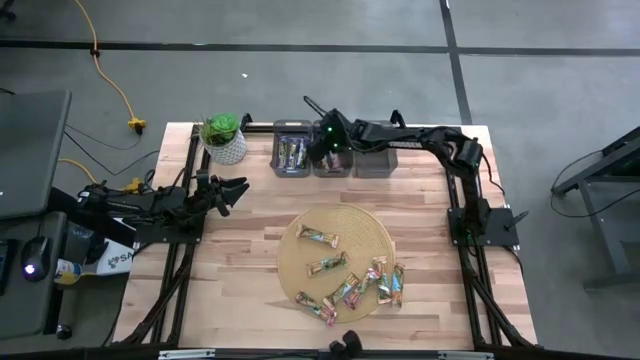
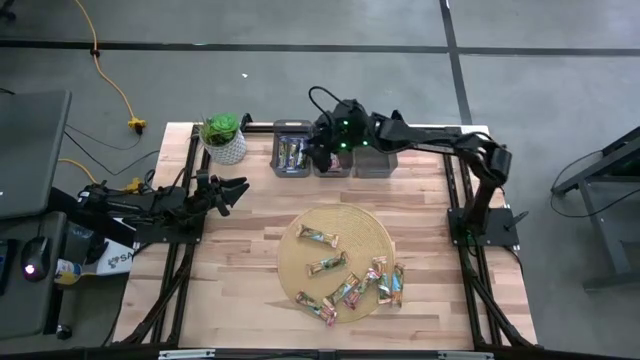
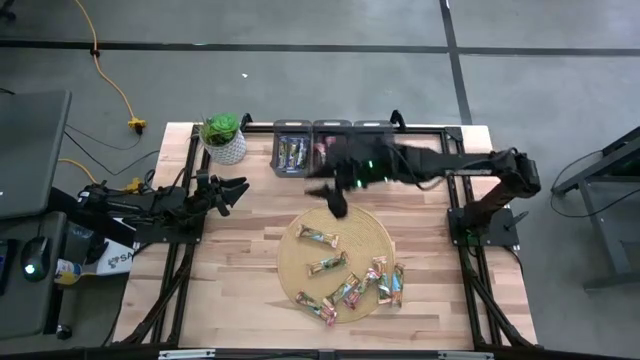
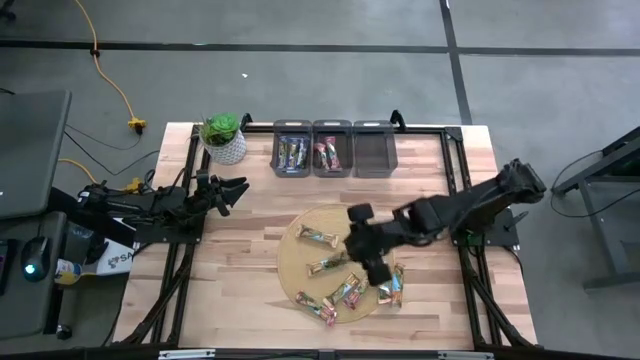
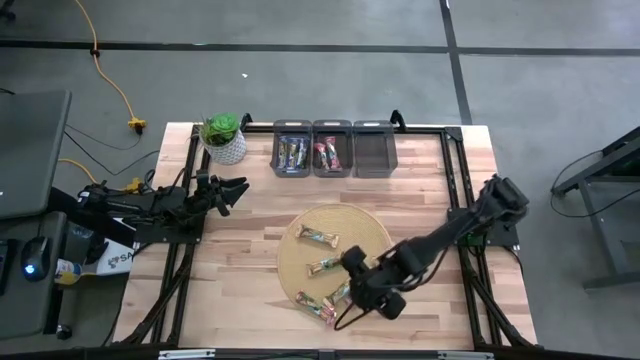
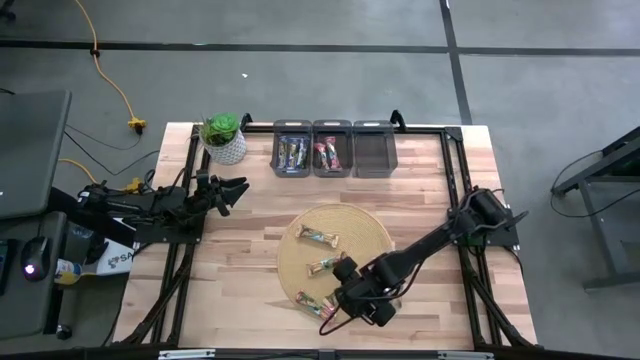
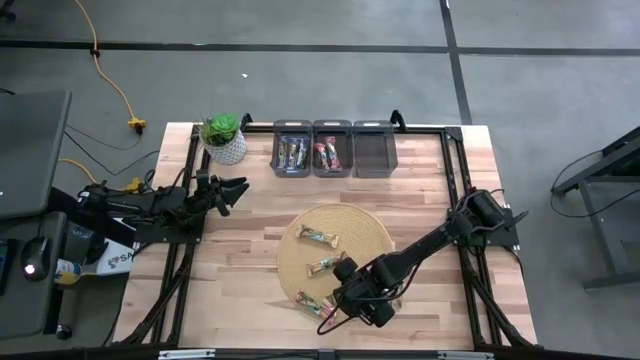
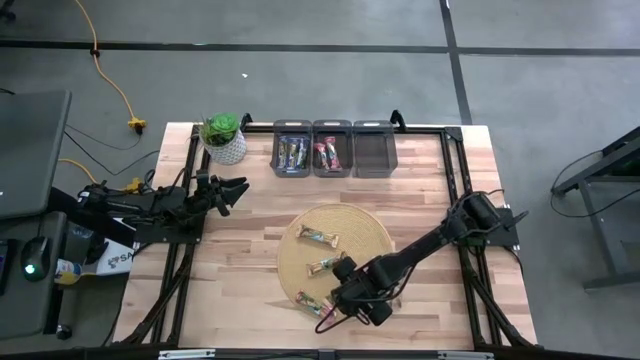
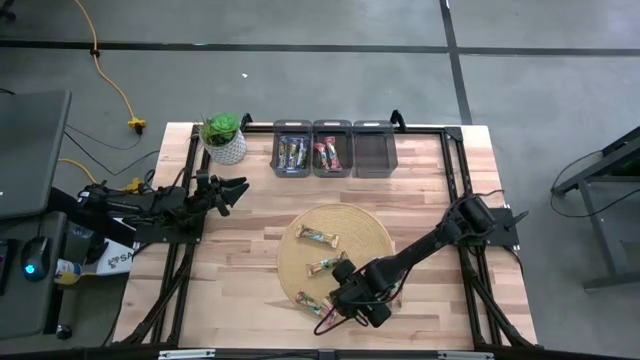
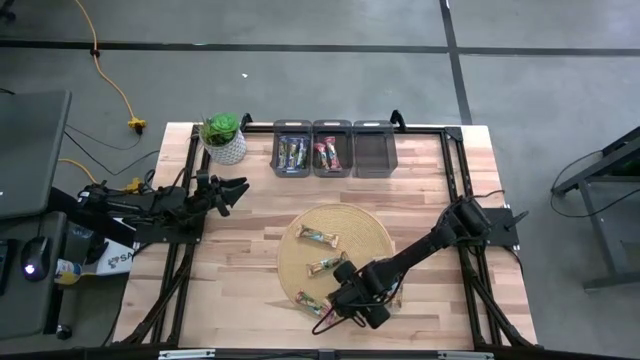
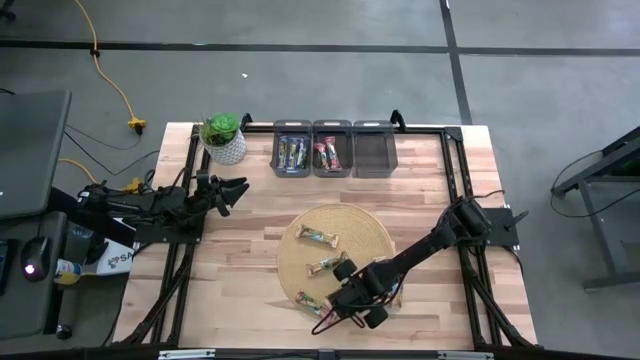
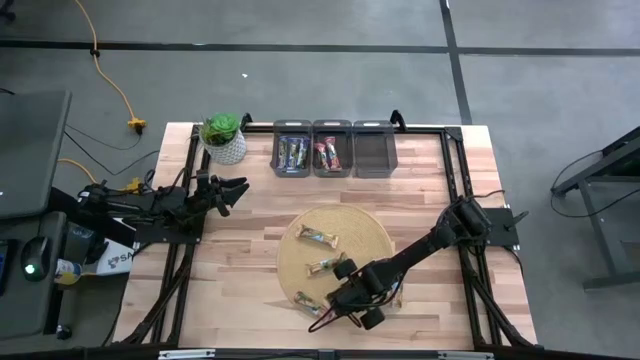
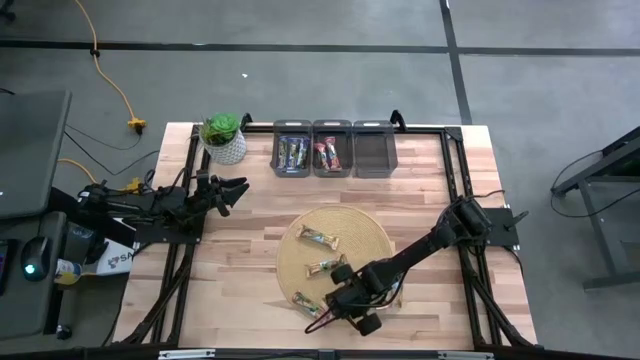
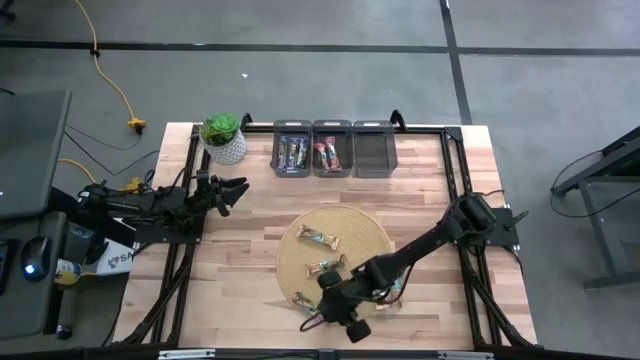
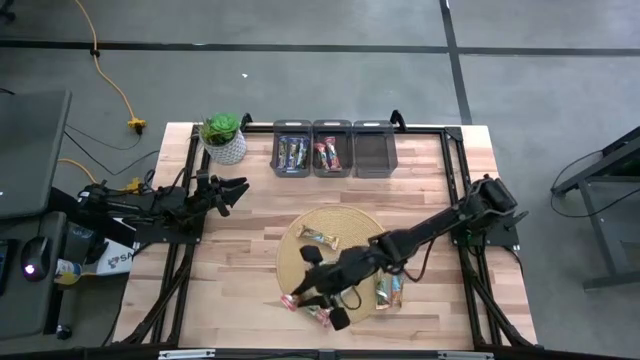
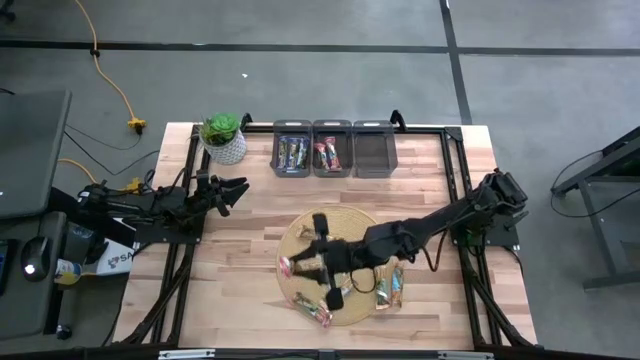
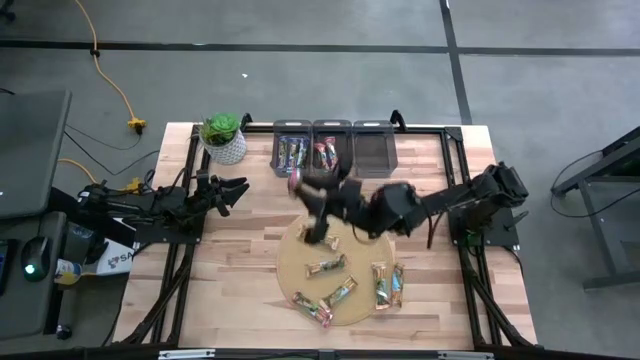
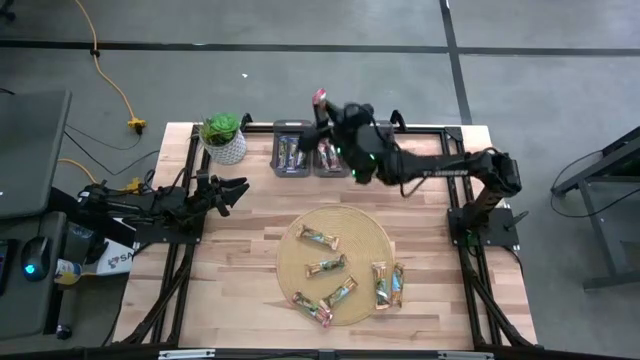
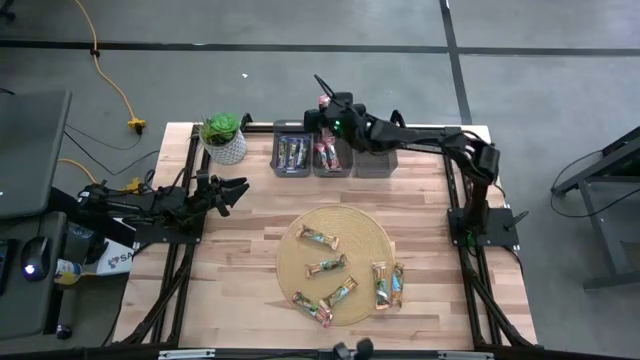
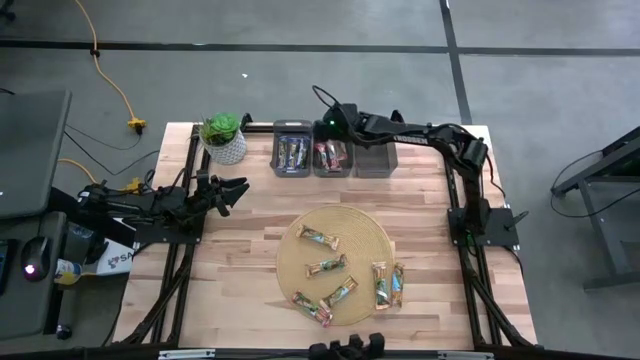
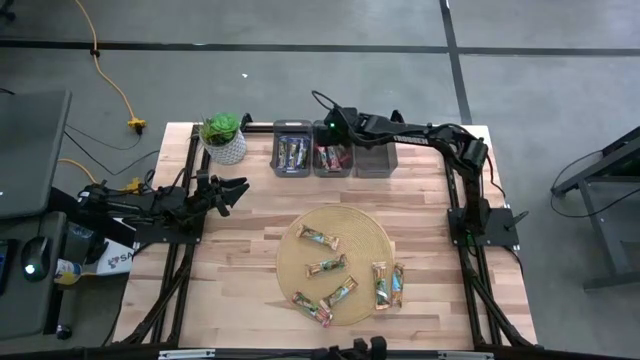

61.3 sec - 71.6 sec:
Task: Pick and place Granola Bars by type
Put the red granola bar into the middle black bin

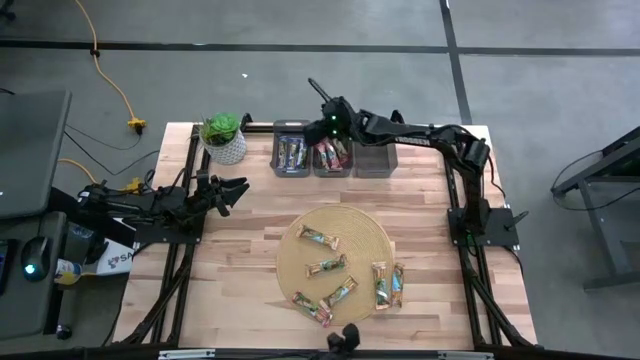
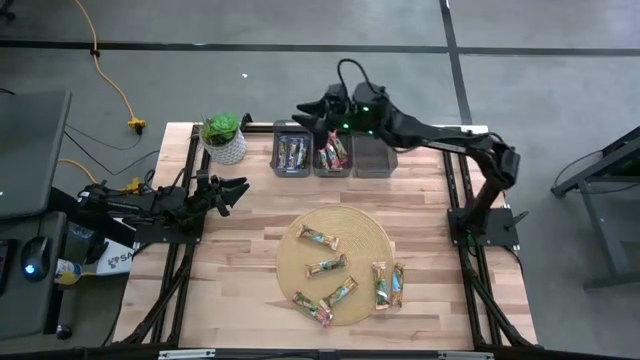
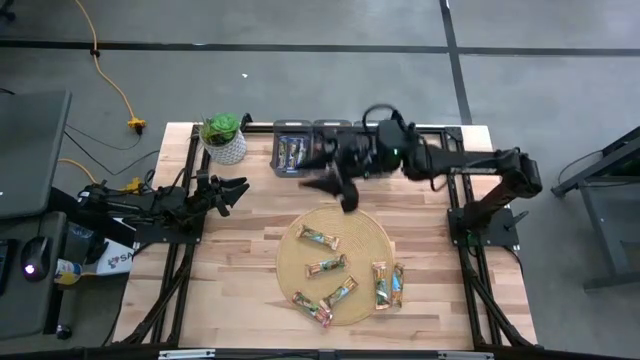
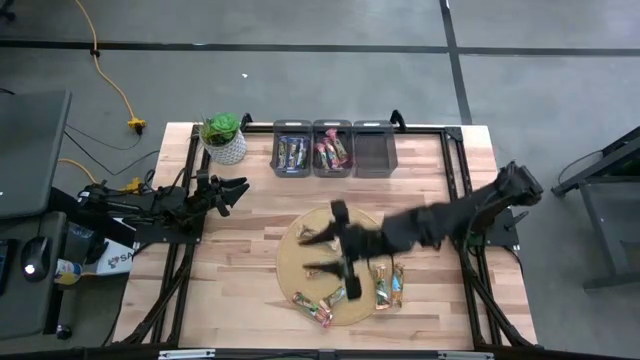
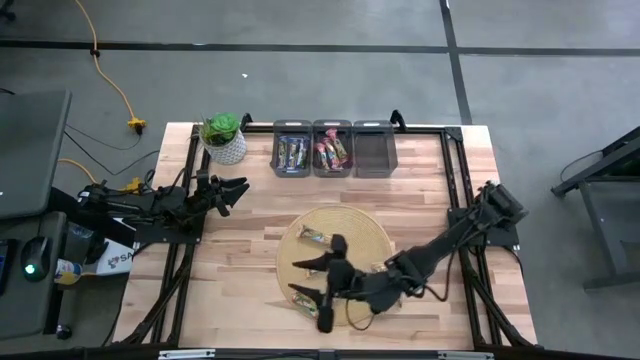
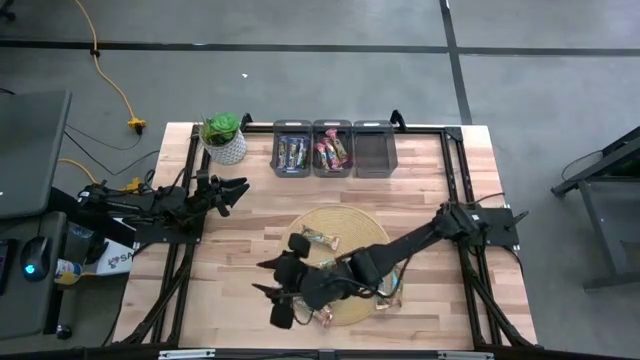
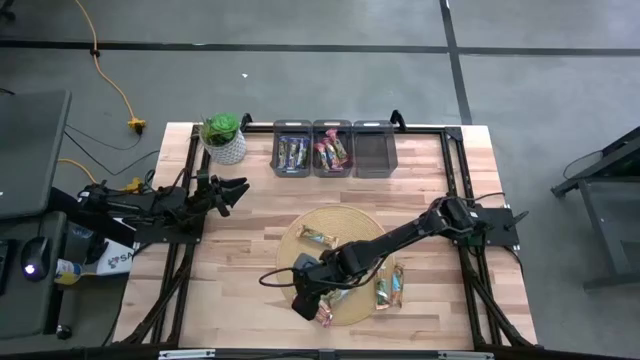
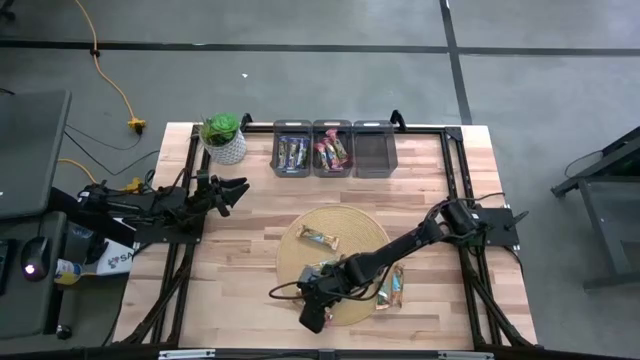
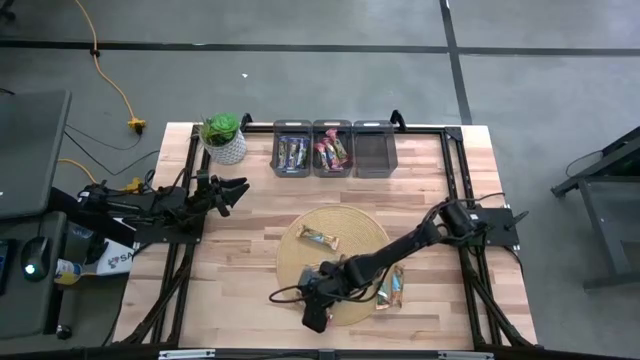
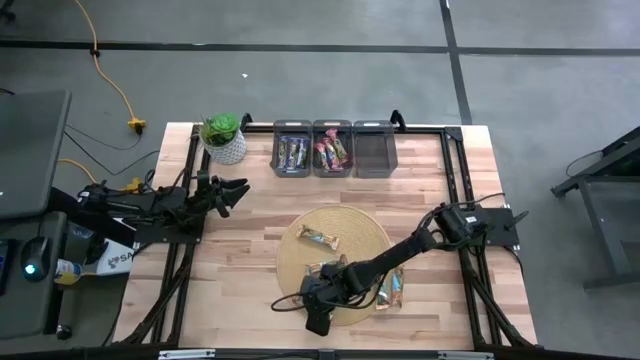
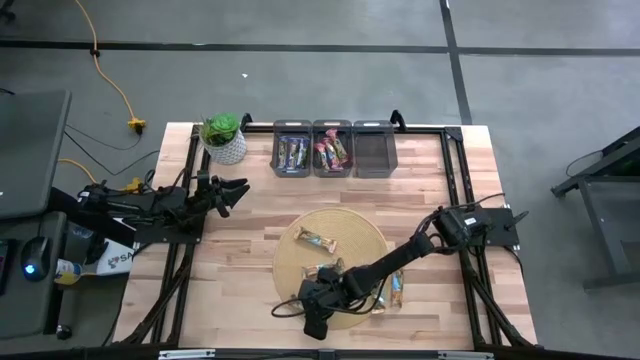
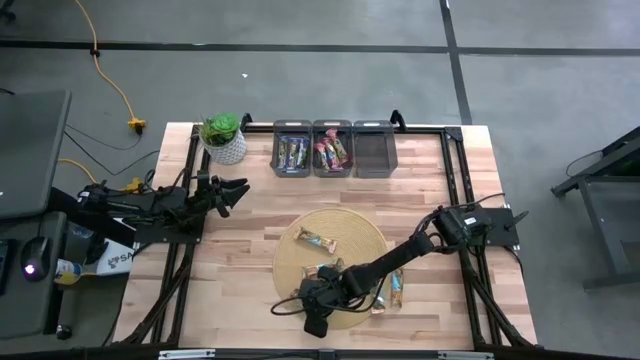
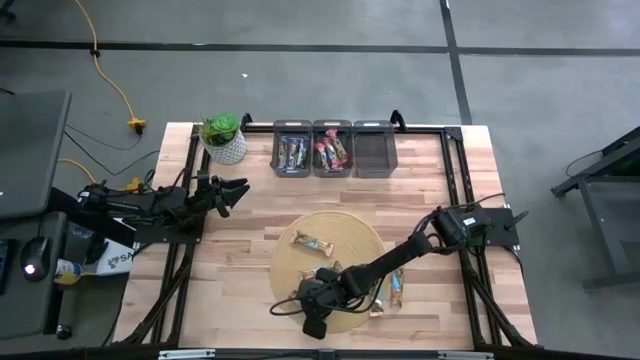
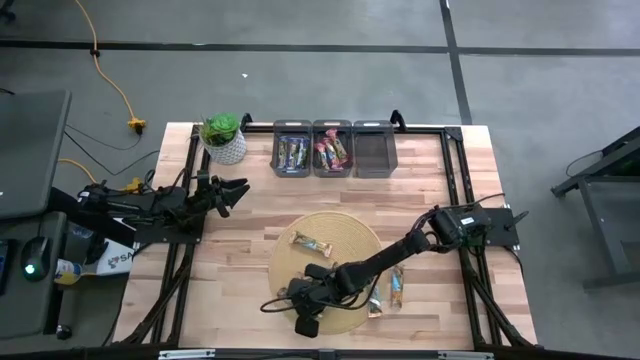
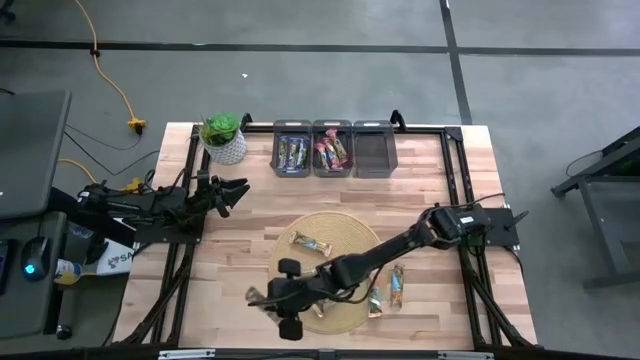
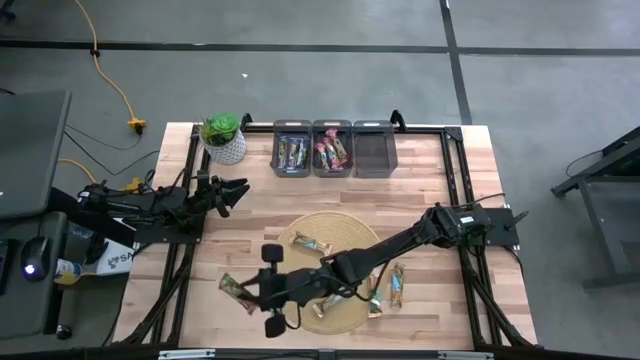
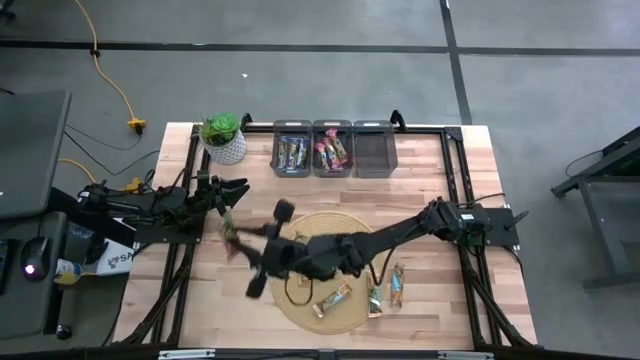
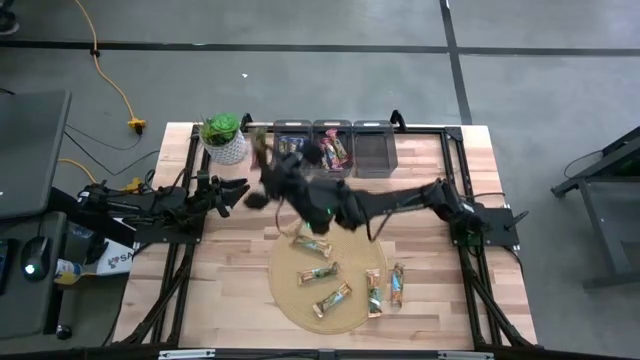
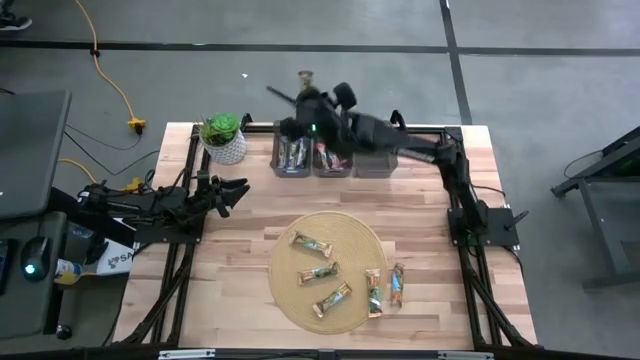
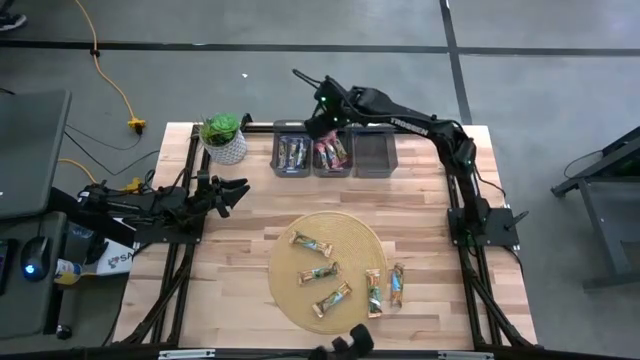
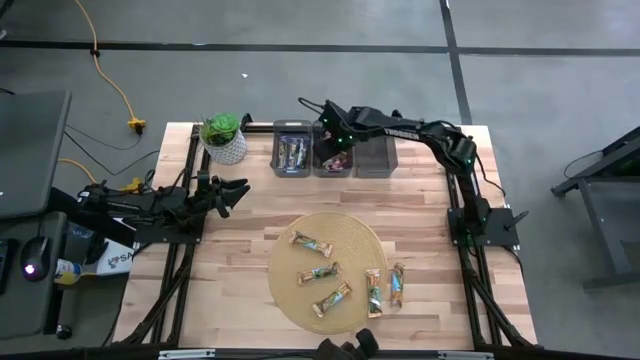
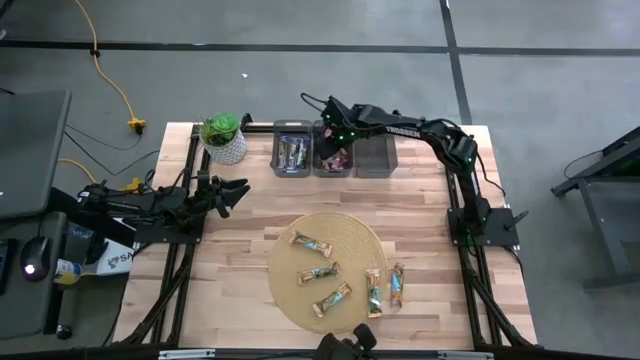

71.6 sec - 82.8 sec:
Put the red granola bar into the middle black bin

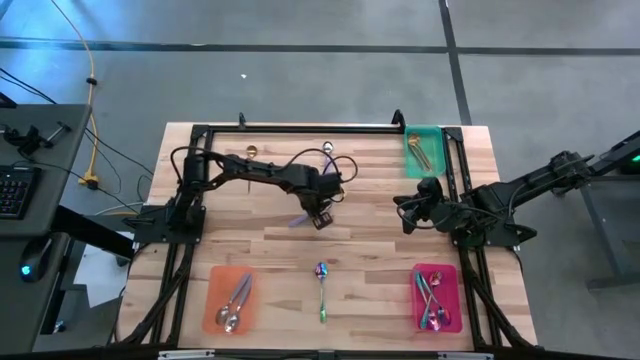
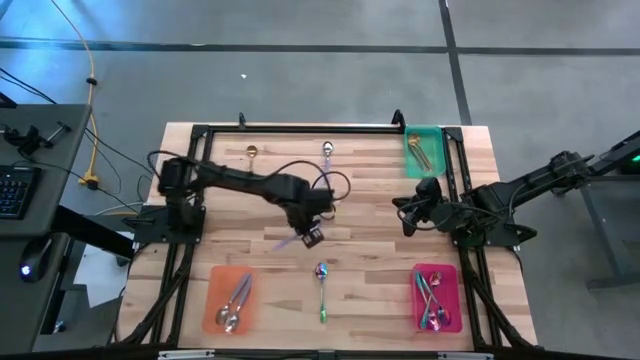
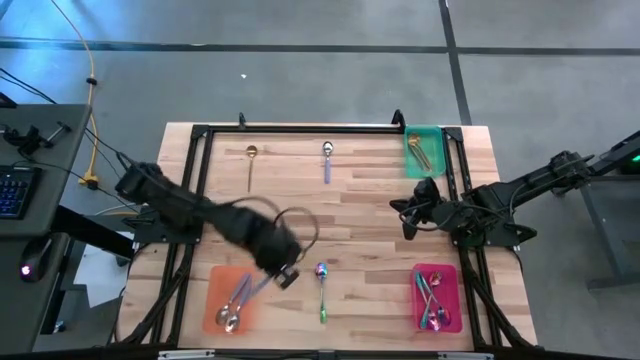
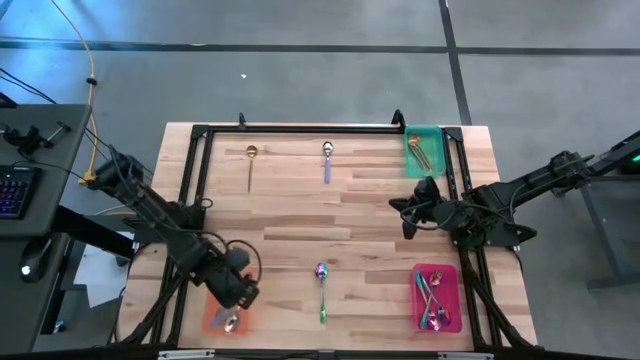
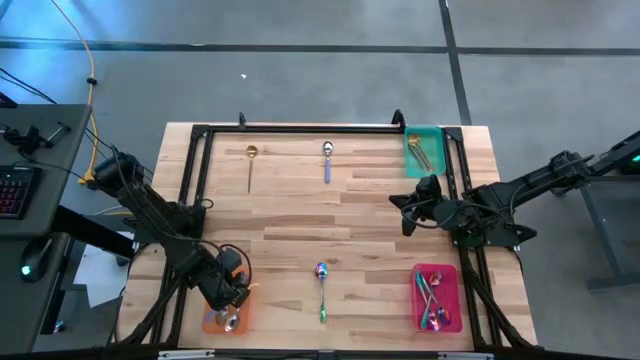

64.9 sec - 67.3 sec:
Task: Sort silverware by color (type)
Put the purple spoon into the orange bin
